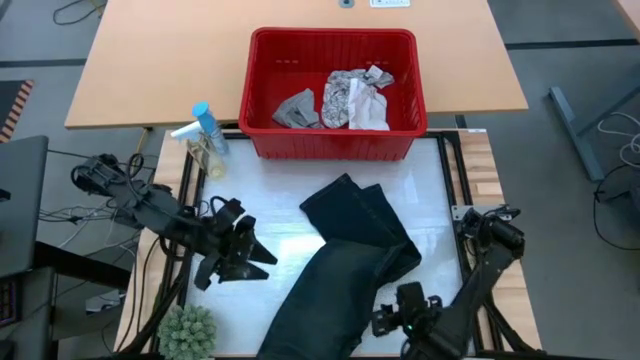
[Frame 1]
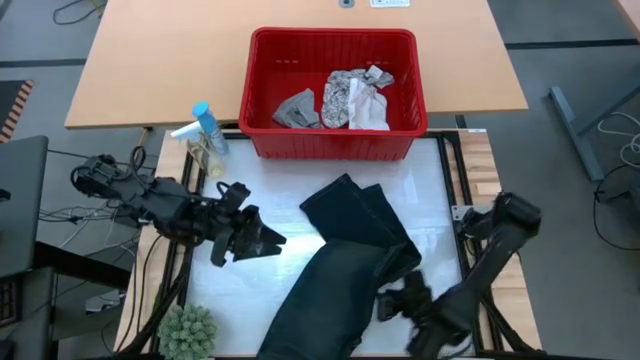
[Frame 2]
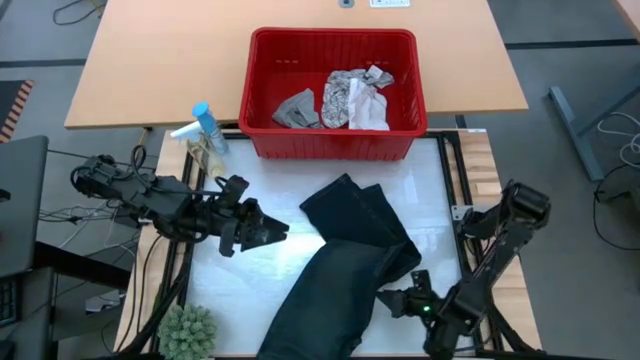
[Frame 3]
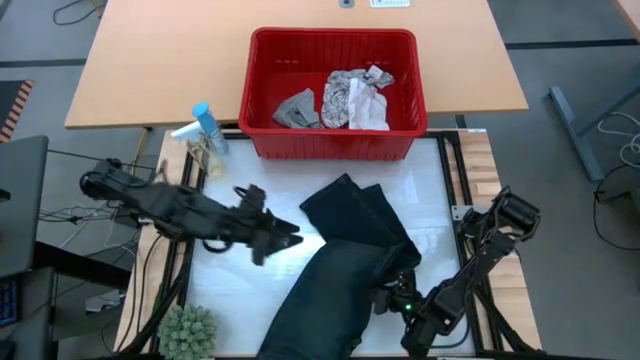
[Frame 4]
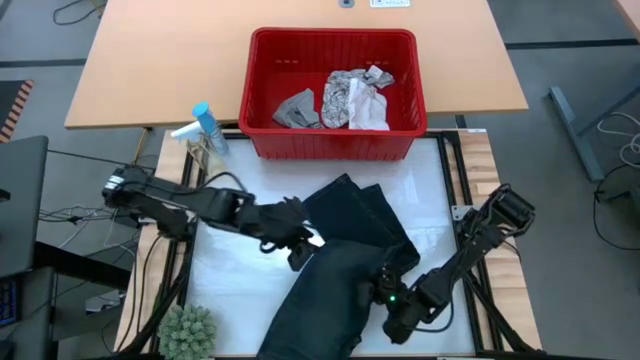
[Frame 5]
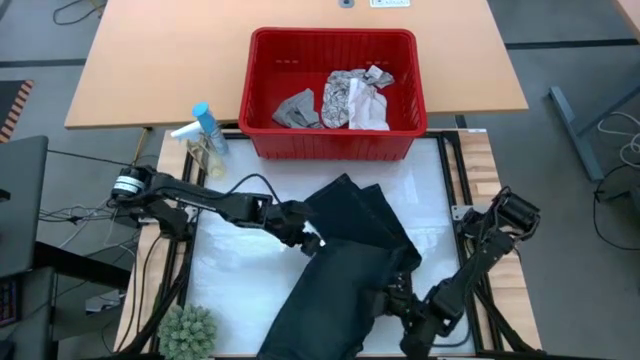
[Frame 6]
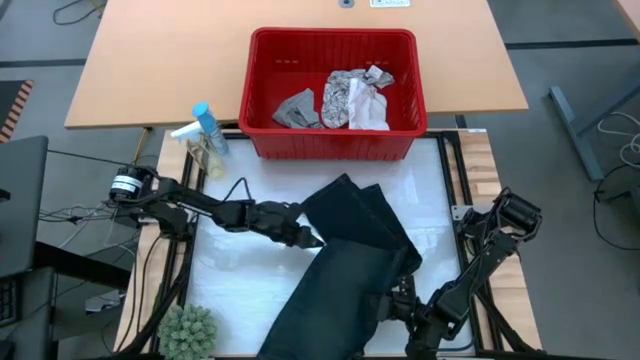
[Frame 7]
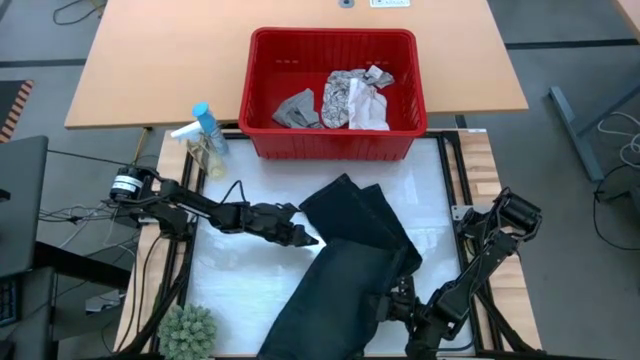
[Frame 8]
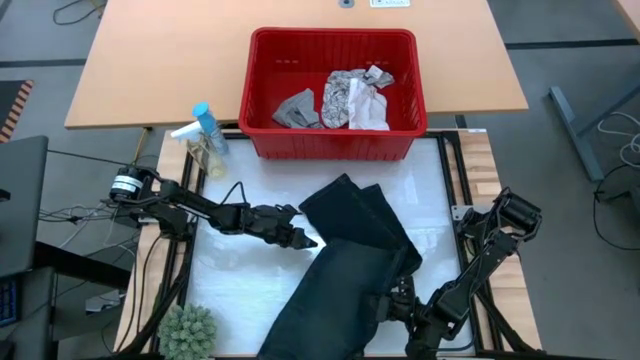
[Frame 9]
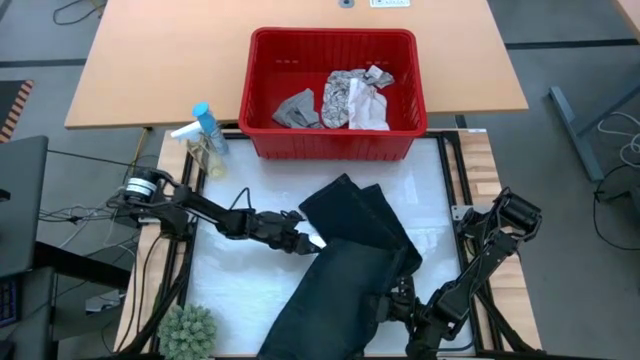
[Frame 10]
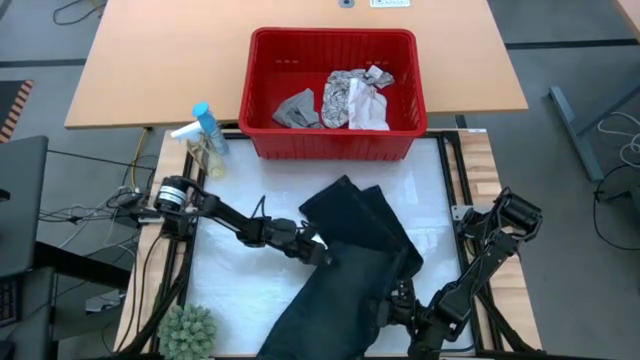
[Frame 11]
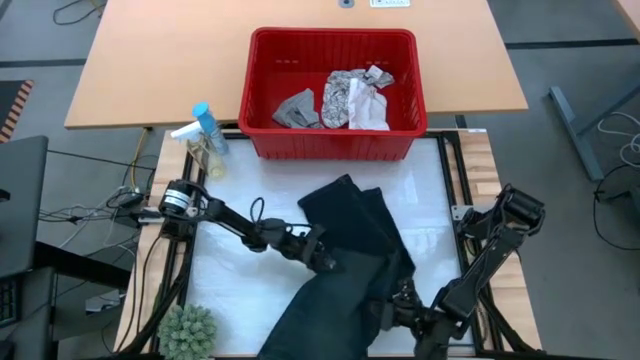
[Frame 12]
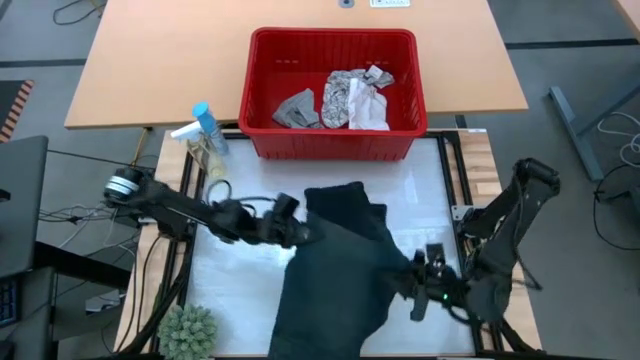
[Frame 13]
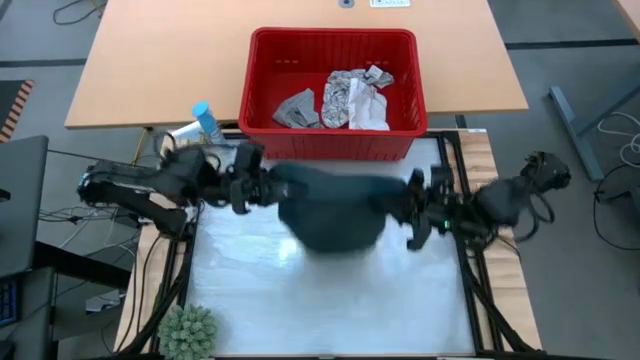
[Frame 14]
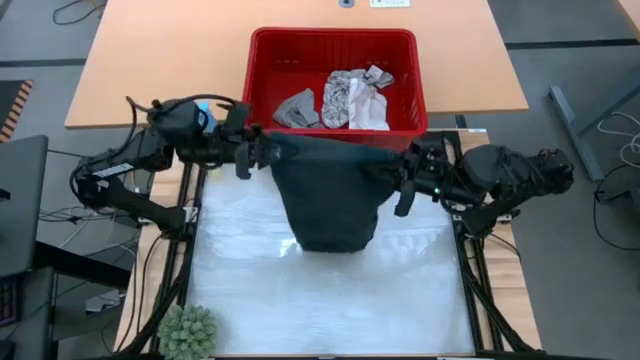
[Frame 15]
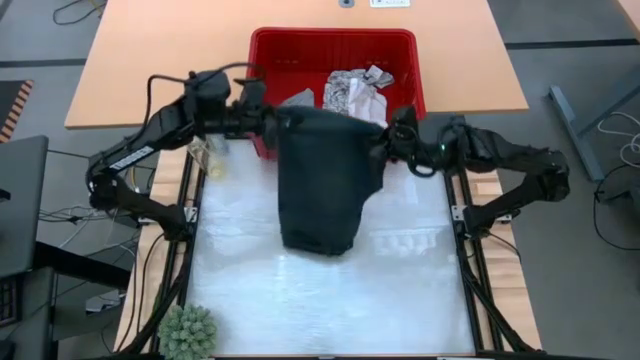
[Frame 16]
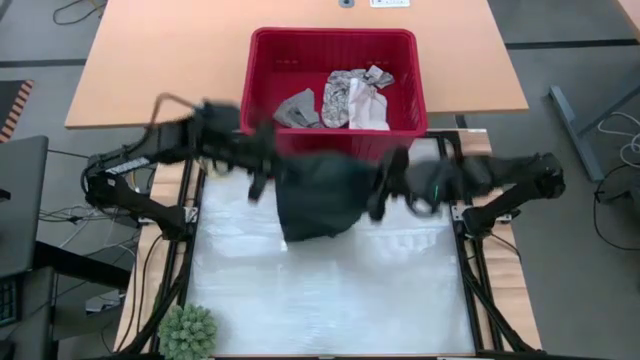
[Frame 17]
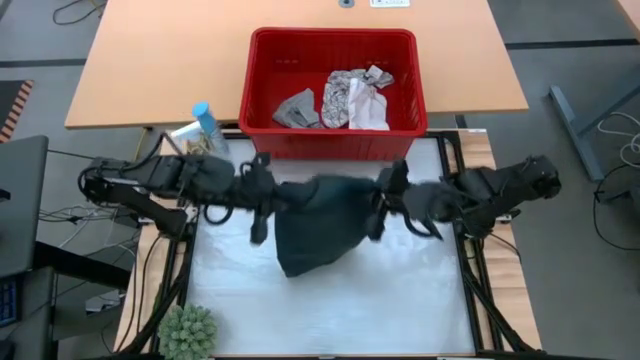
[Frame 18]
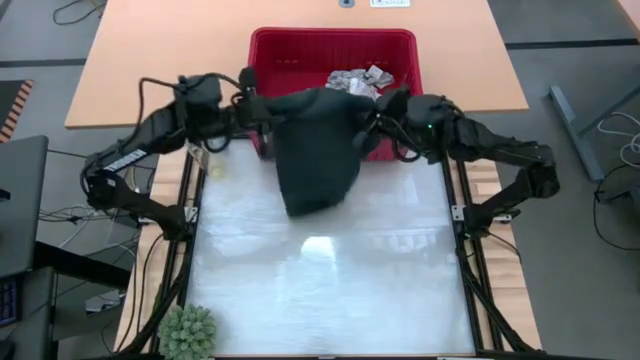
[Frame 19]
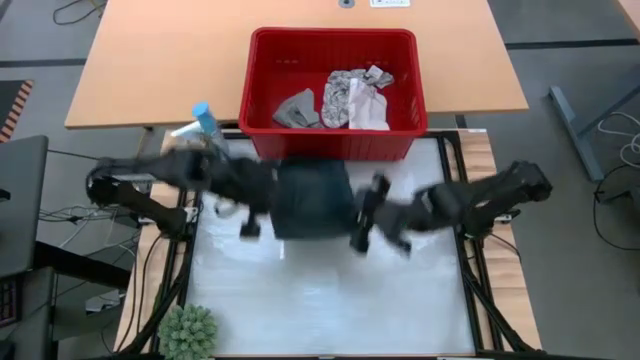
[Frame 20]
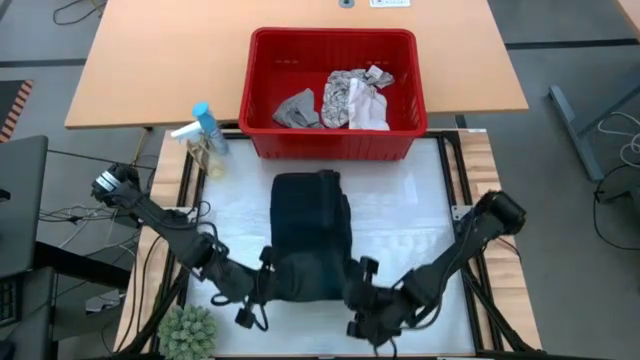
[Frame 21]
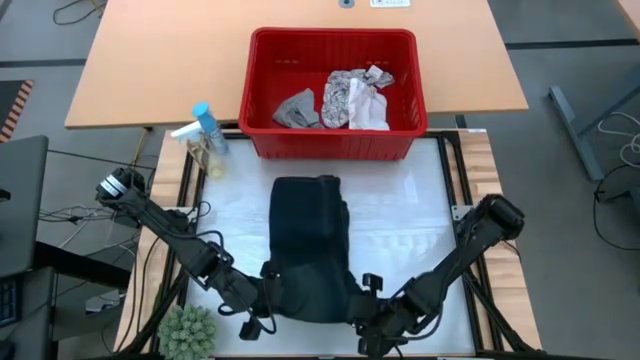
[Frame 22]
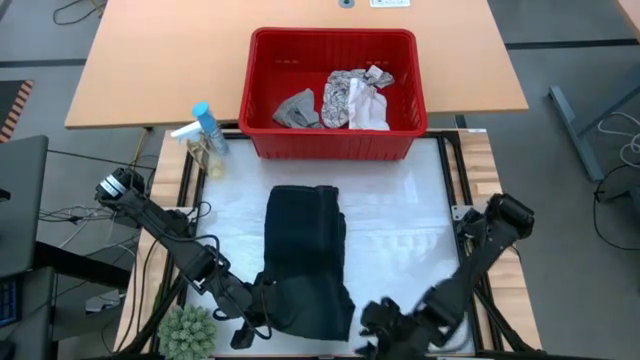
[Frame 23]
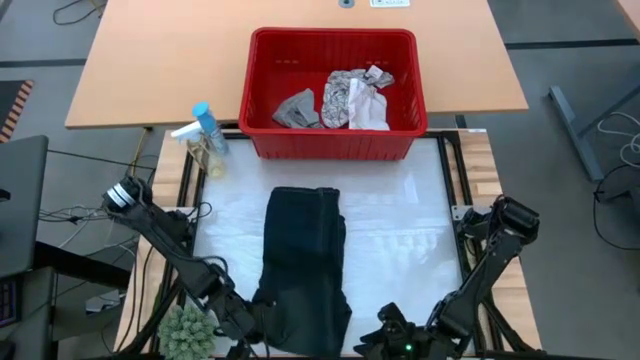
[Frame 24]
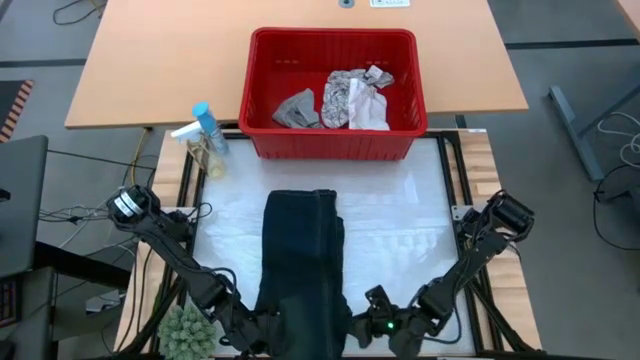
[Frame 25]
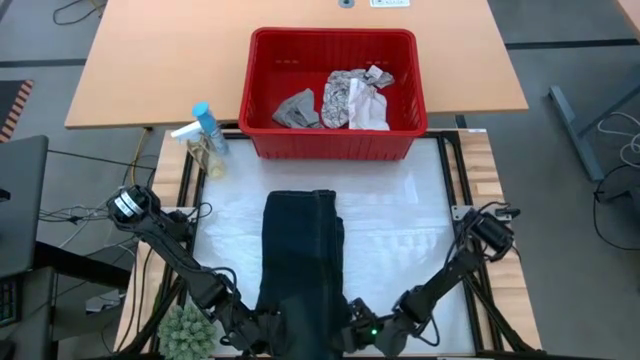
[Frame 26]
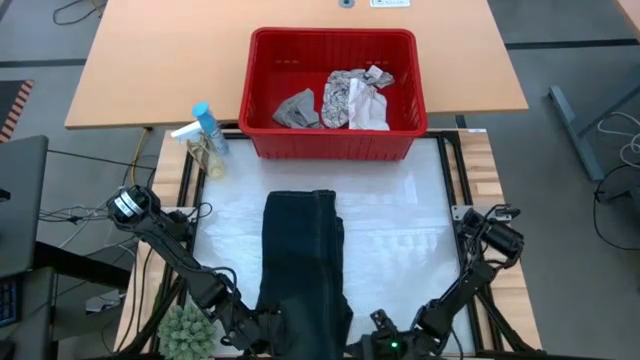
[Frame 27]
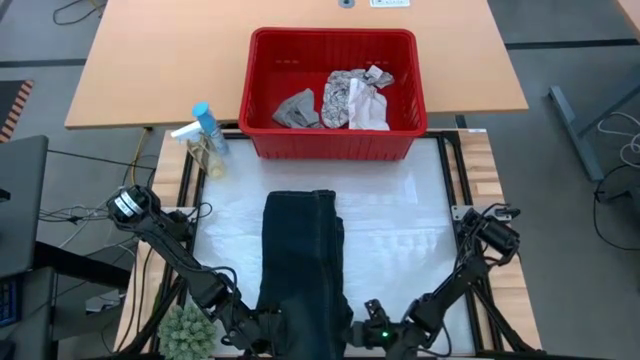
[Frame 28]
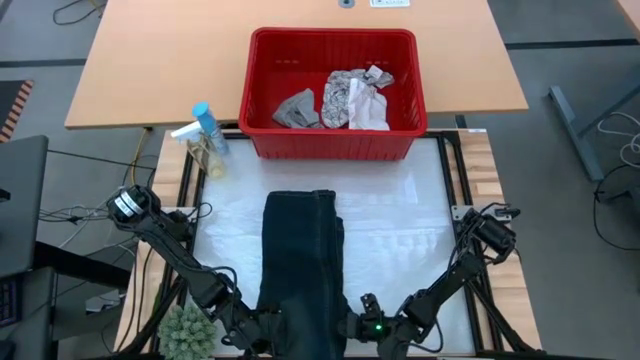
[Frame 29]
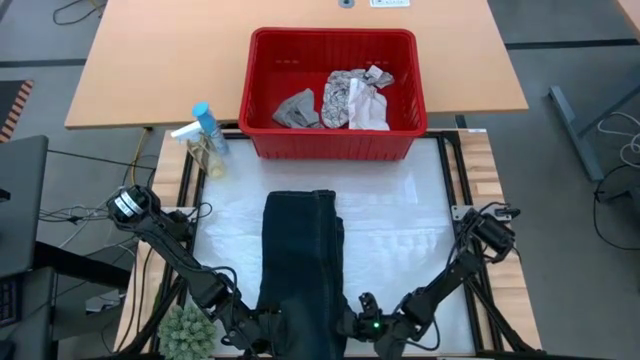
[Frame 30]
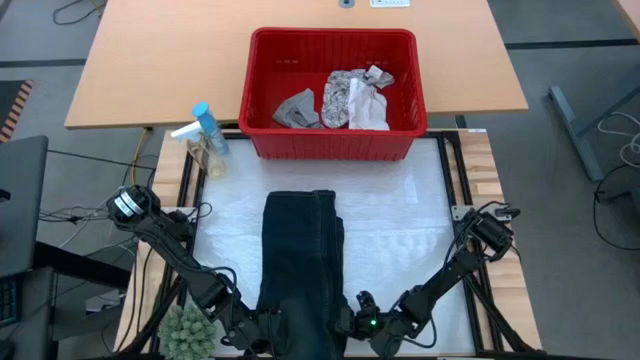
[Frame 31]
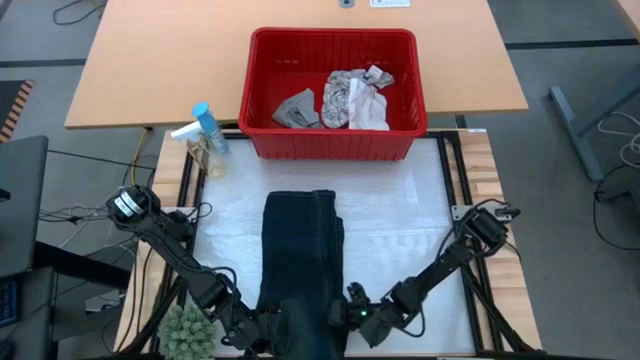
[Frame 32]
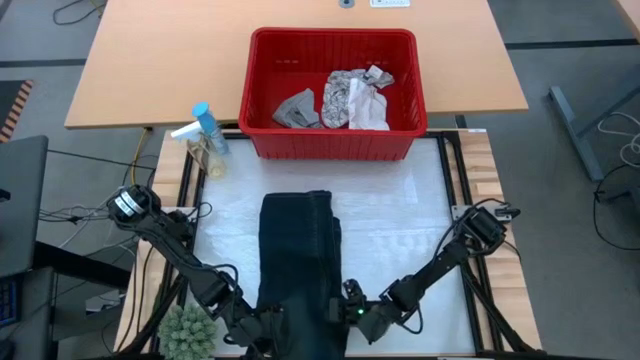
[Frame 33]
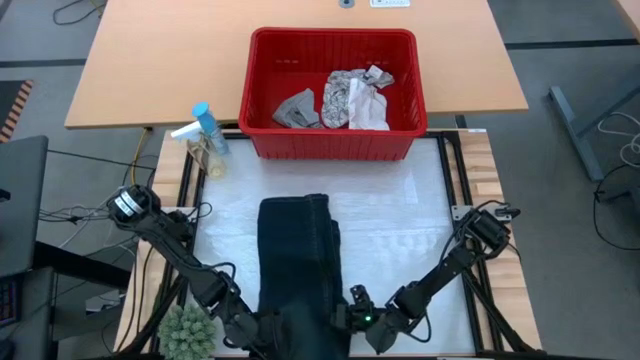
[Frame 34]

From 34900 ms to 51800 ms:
Task: Fold Laundry from Bin
Fold the blue pants from the red laundry bin

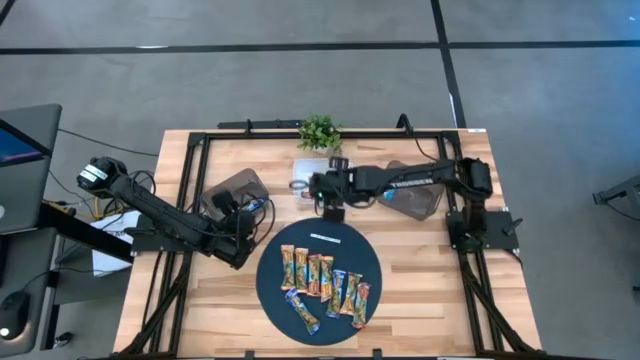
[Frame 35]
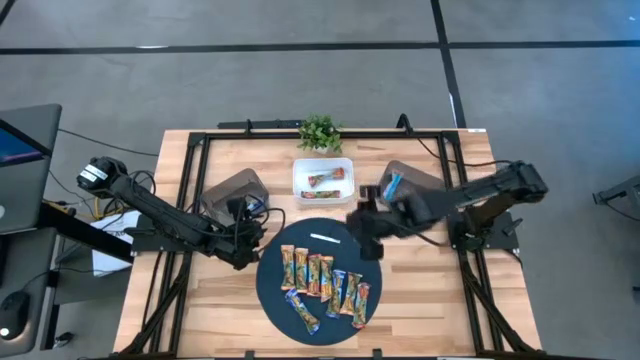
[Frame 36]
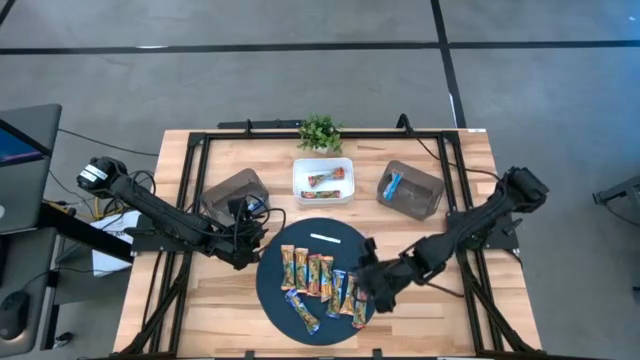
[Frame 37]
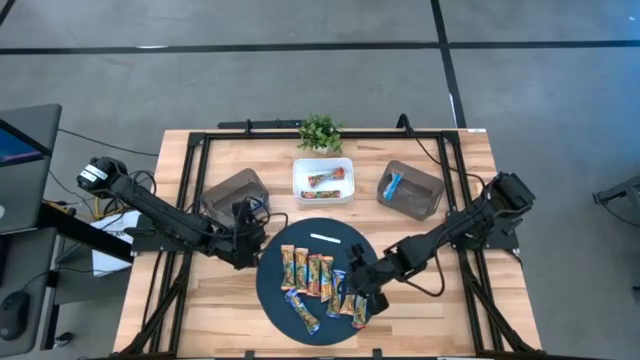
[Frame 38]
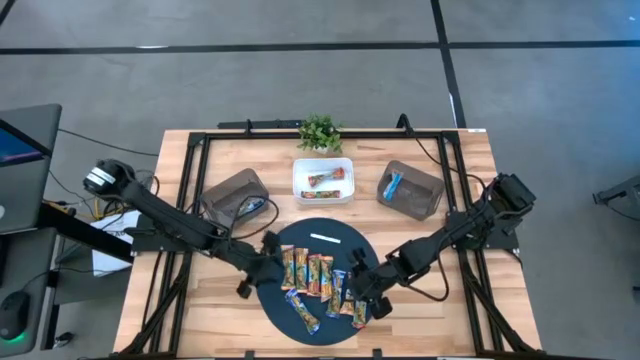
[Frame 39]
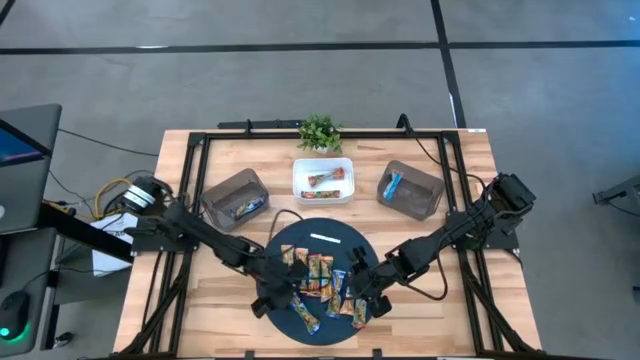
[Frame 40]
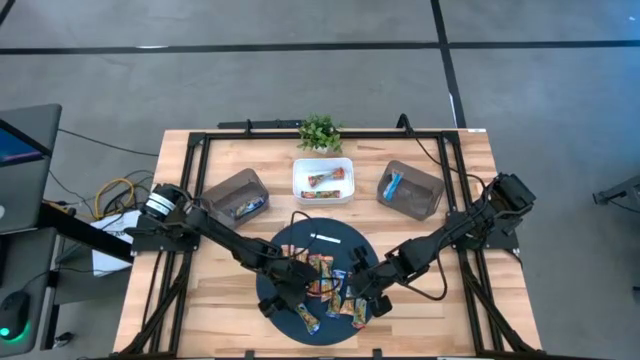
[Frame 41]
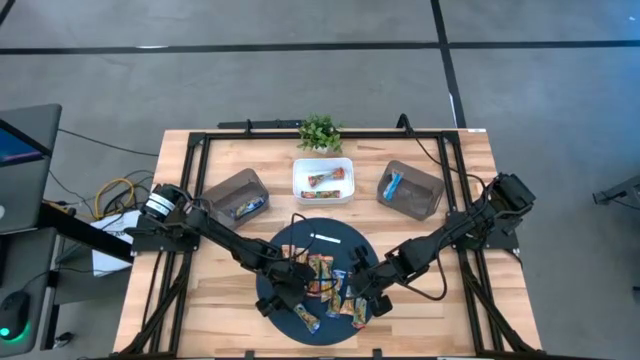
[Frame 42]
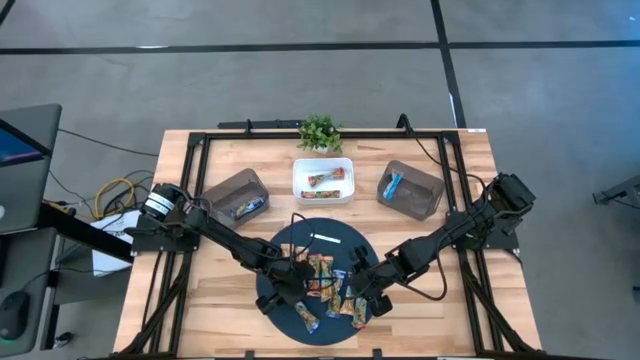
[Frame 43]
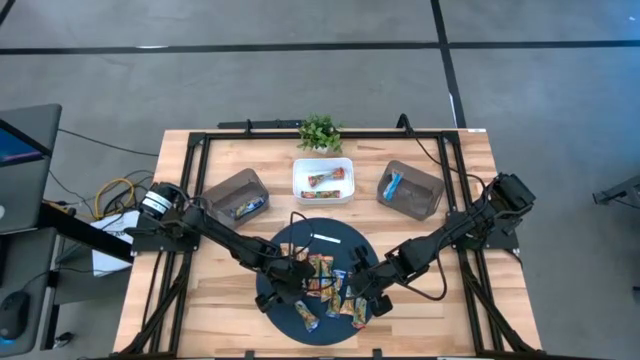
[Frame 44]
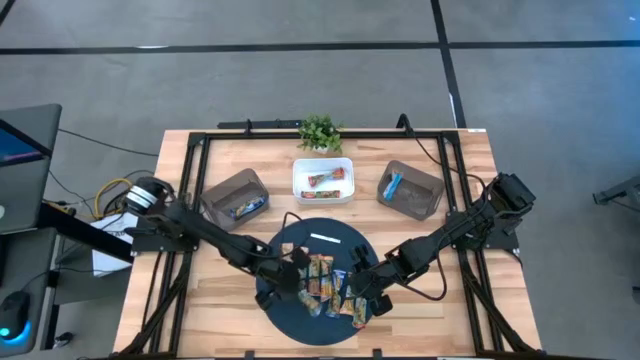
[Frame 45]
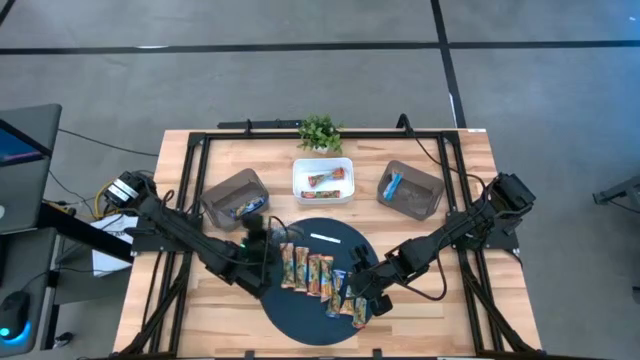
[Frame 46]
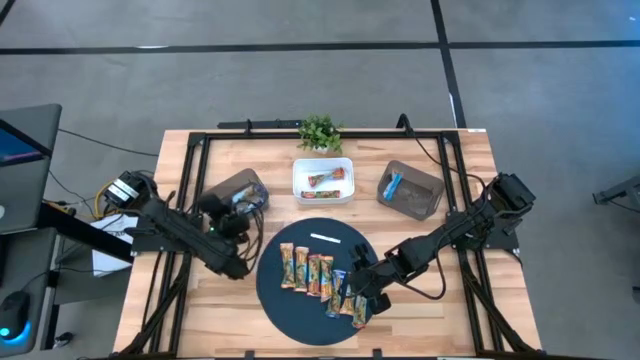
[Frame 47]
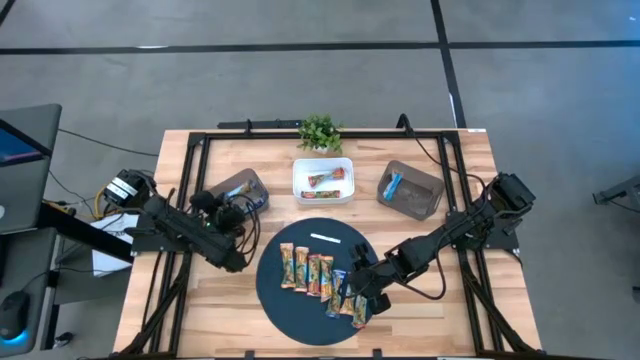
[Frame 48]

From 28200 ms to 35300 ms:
Task: Pick and place Granola Bars by type
Put the blue granola bar into the left black bin
